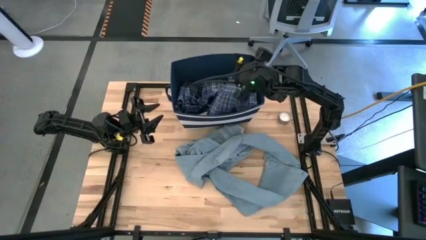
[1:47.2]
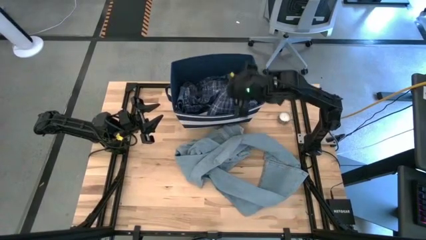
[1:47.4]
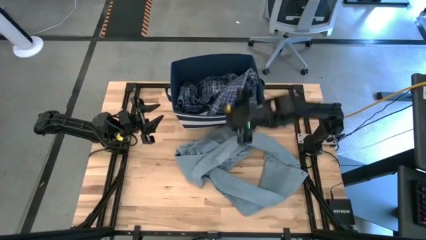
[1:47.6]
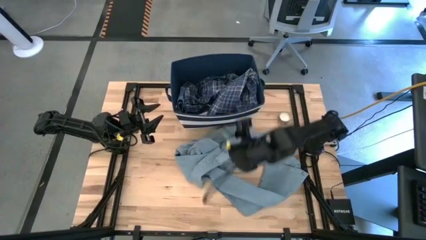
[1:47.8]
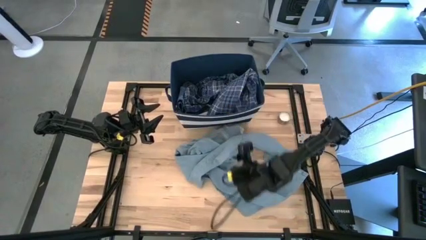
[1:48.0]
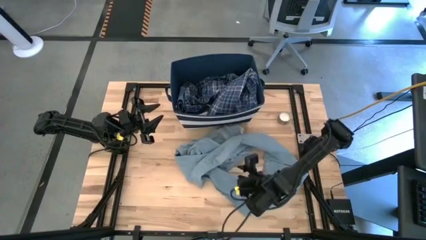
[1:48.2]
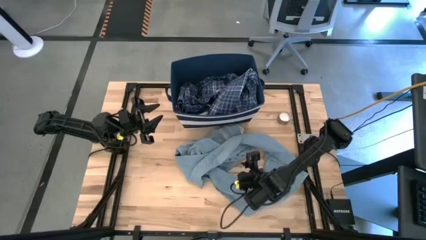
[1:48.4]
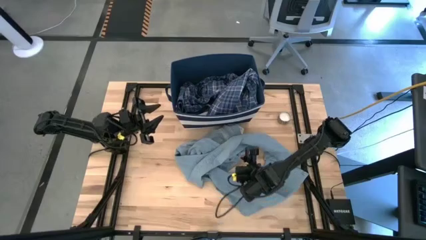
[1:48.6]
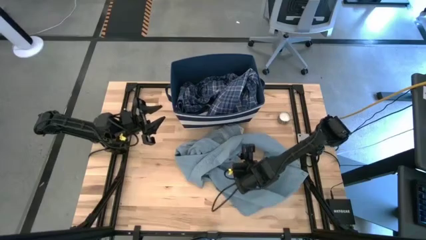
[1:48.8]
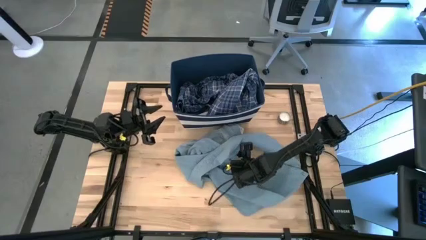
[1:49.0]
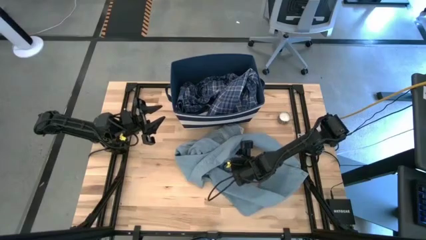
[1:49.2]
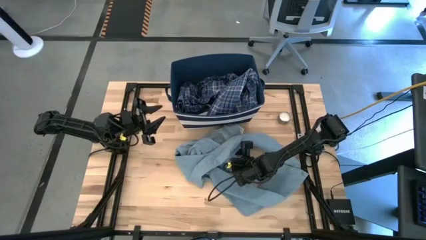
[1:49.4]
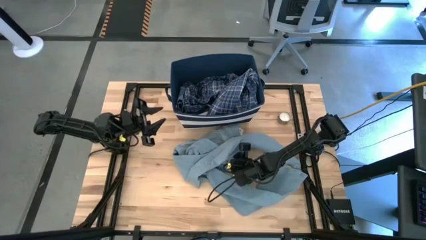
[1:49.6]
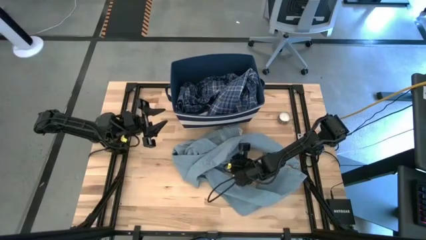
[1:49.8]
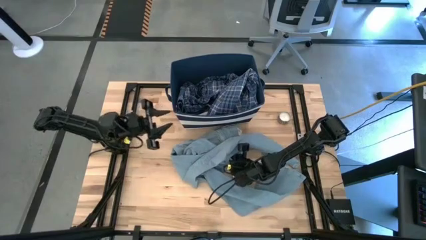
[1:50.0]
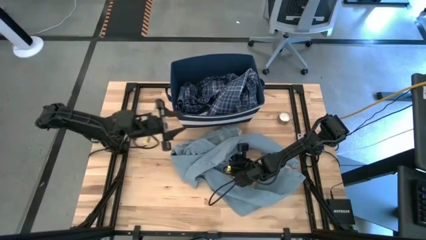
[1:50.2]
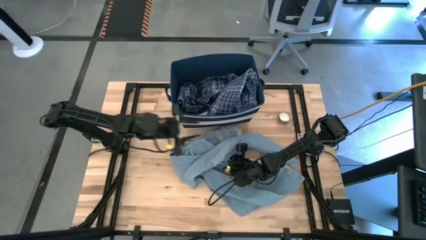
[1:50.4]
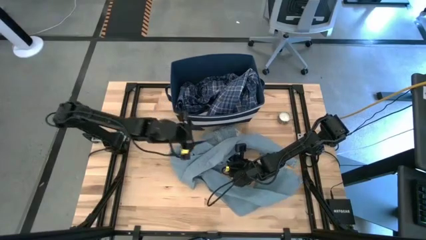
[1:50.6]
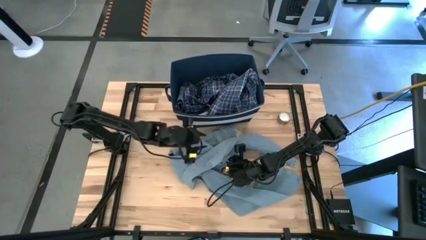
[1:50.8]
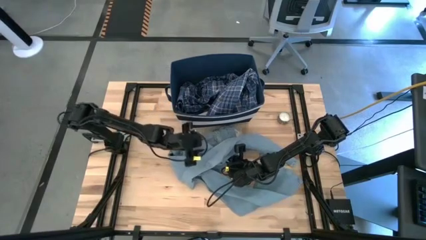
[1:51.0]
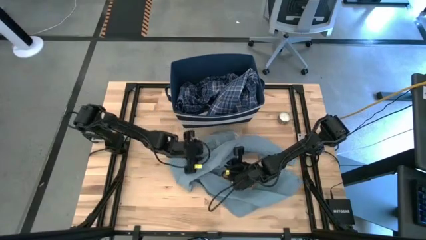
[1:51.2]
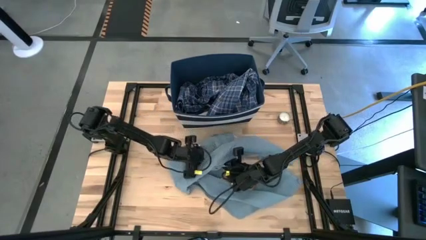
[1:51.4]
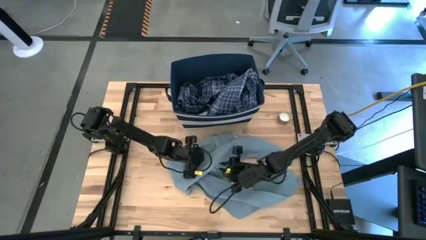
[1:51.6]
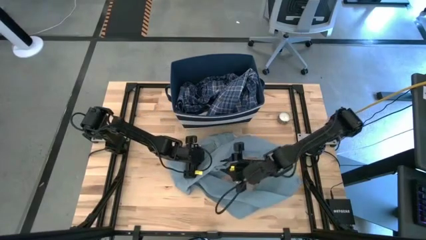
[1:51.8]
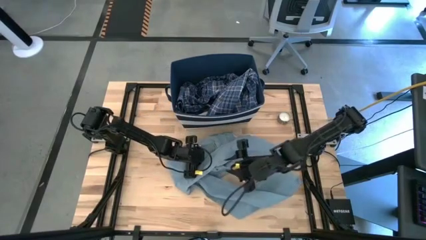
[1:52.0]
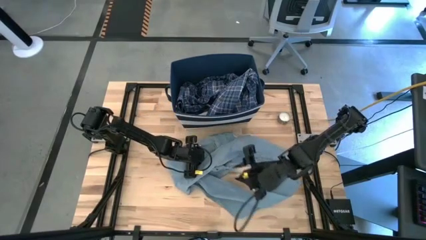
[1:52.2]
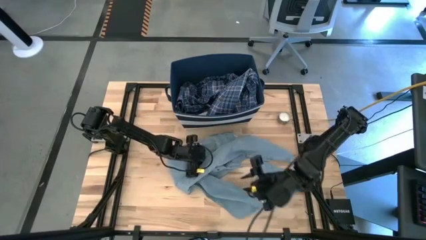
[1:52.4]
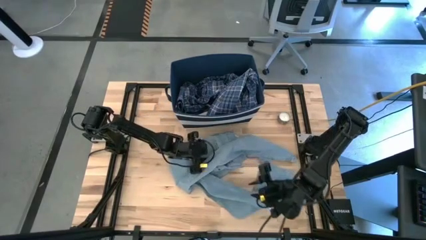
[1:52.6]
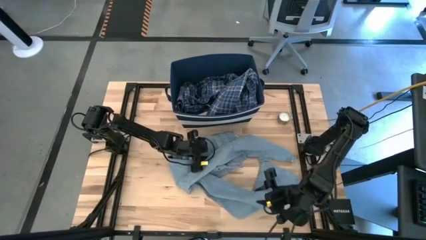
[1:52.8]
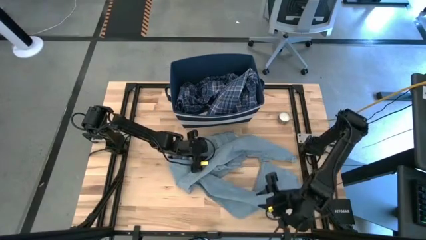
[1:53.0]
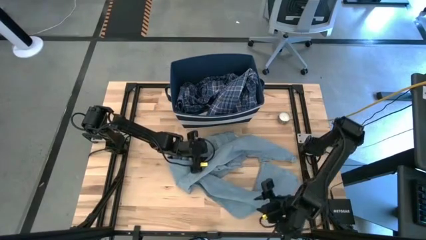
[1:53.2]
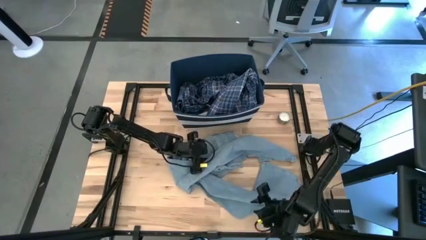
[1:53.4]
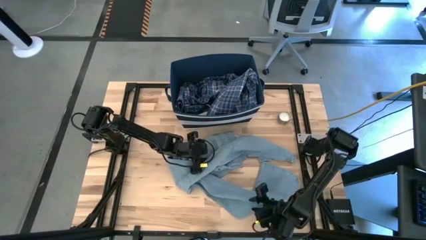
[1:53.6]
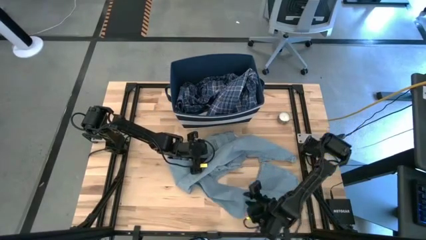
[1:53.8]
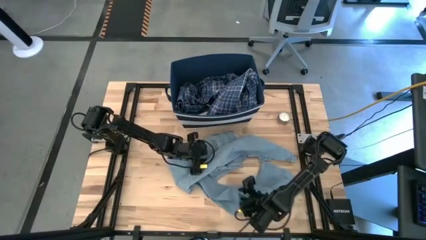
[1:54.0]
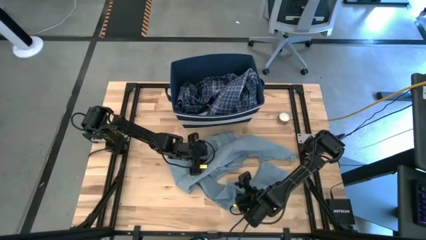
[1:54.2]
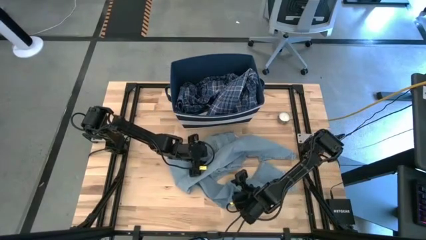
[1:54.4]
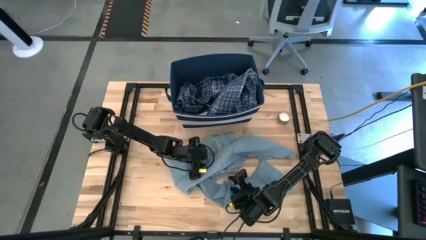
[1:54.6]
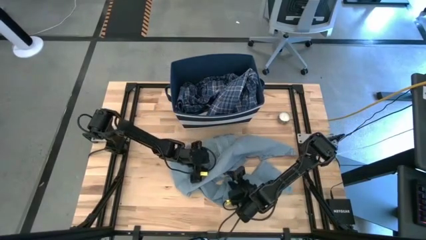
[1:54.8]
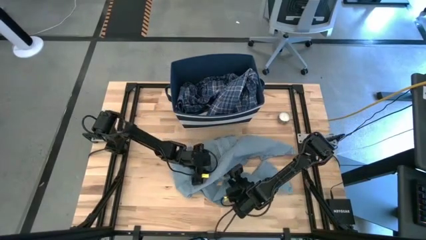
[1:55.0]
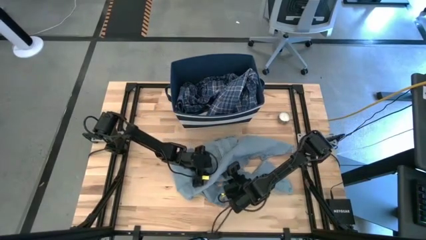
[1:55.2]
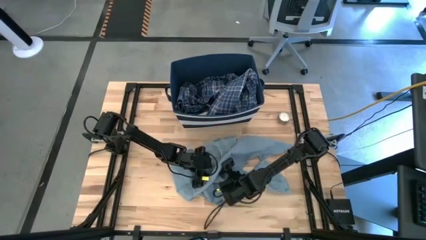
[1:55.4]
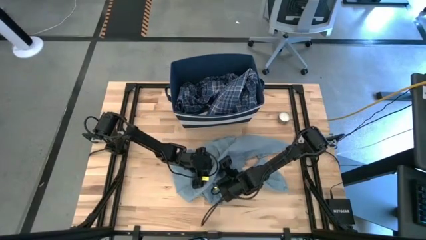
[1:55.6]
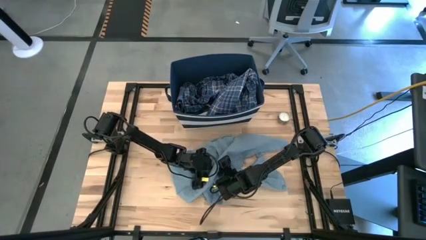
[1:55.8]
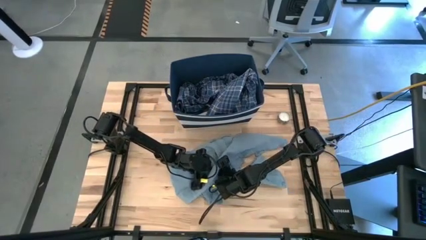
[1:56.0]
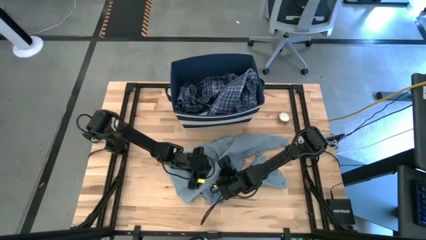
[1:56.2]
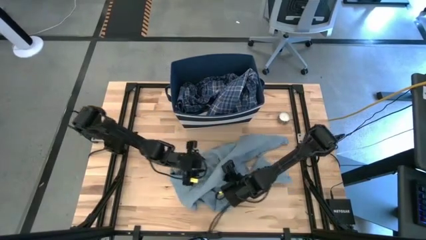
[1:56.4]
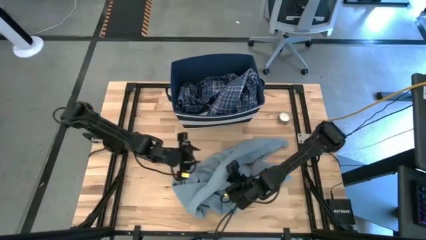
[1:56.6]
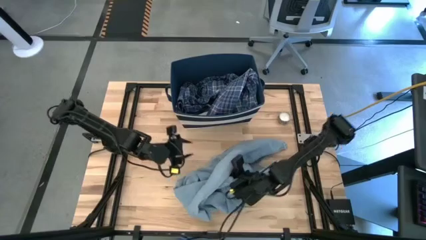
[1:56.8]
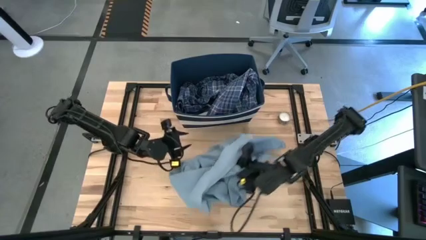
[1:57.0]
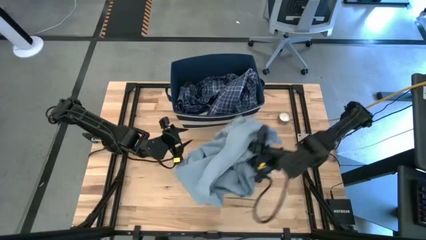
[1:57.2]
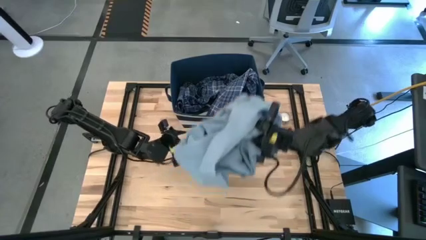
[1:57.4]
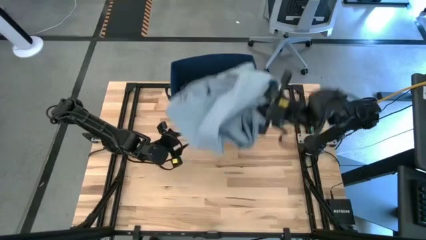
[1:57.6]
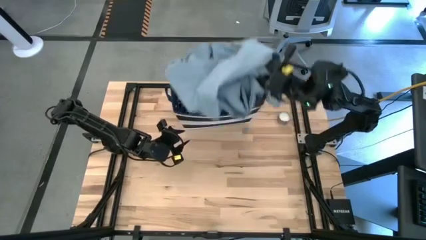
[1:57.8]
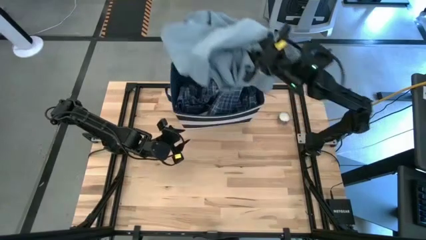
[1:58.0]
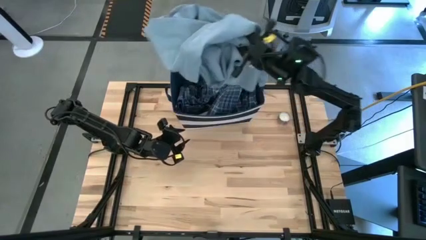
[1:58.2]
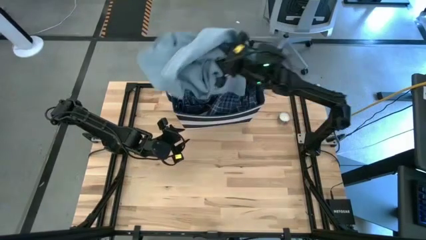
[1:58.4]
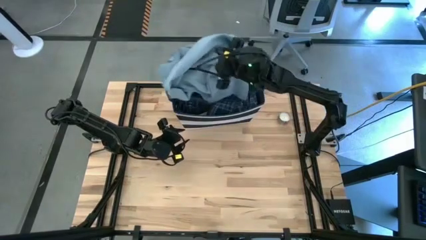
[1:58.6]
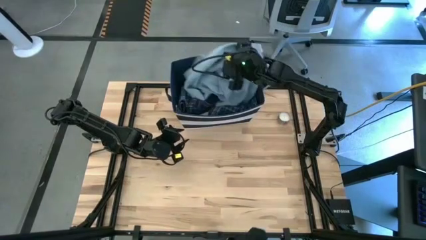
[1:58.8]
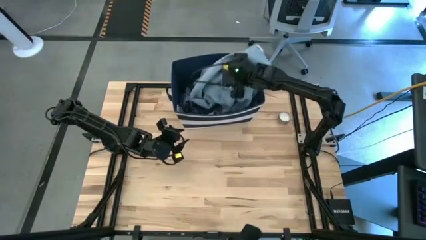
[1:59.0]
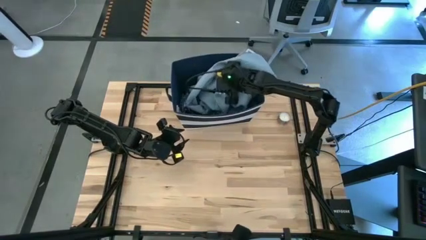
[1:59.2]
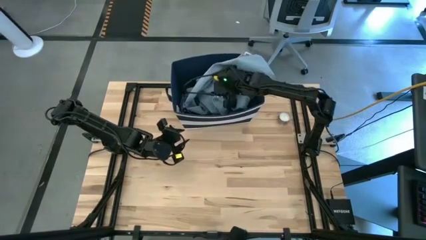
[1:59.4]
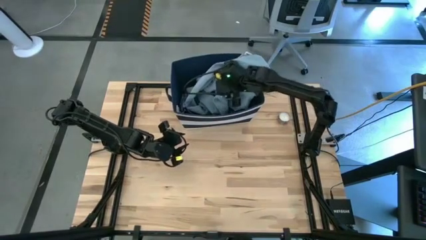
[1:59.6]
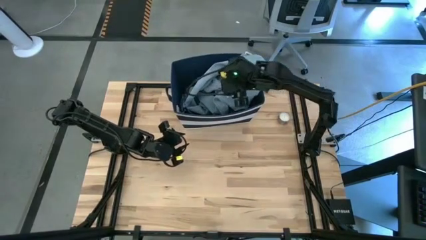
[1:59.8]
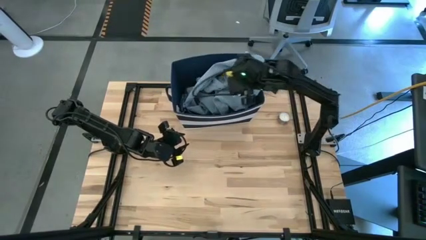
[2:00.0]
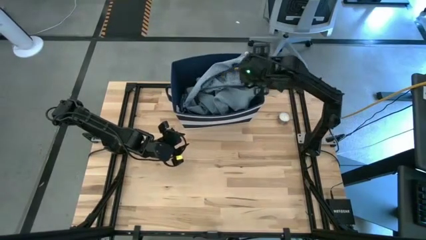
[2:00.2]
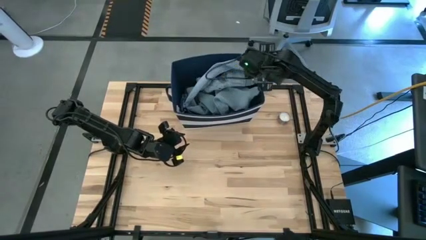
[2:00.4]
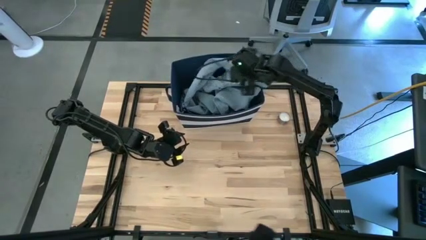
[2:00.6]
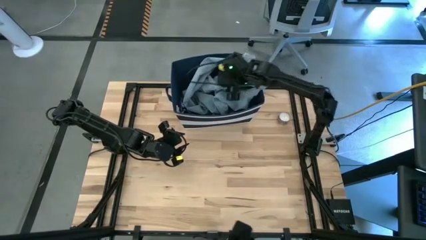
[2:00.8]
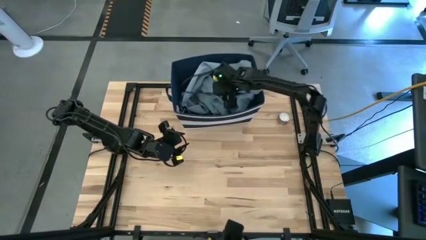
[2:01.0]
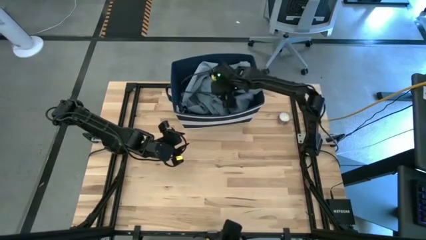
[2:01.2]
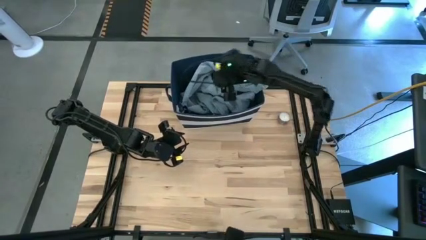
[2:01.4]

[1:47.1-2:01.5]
Task: Sort clothes
Put the blue pants into the blue laundry bin

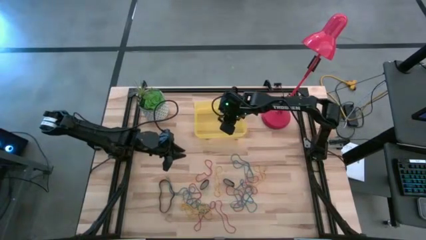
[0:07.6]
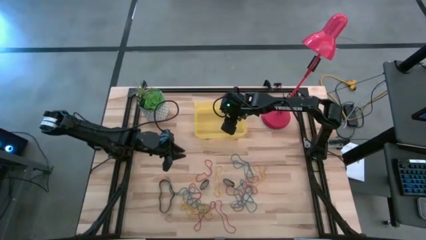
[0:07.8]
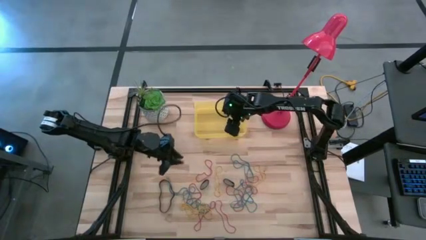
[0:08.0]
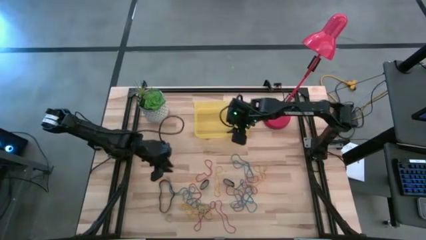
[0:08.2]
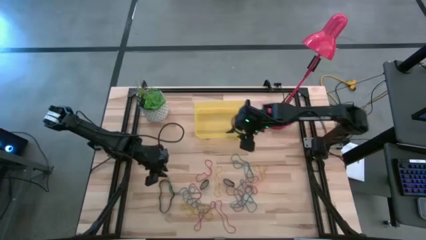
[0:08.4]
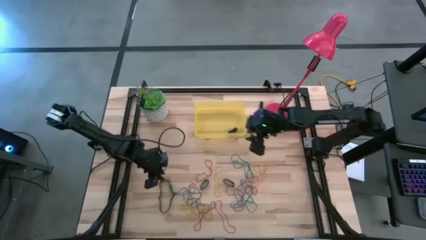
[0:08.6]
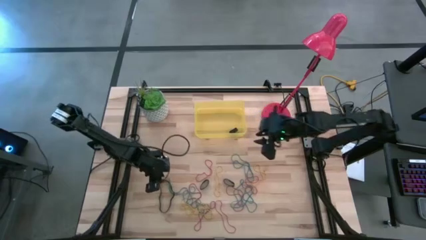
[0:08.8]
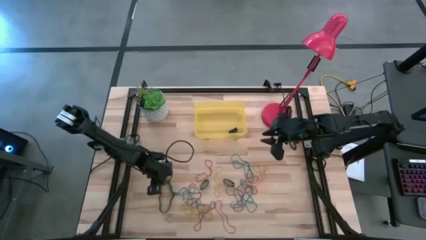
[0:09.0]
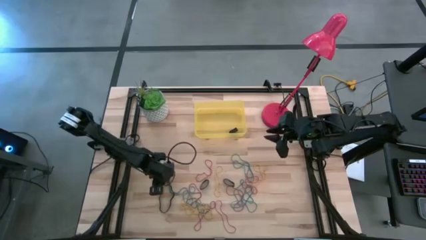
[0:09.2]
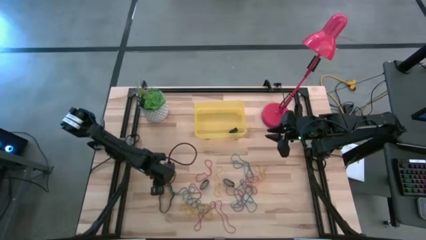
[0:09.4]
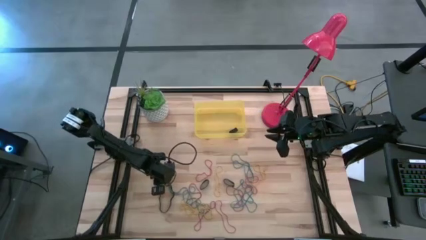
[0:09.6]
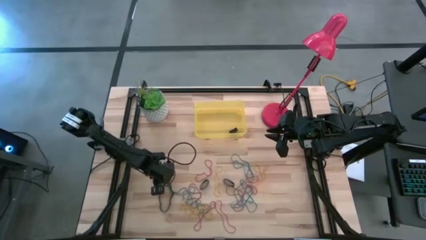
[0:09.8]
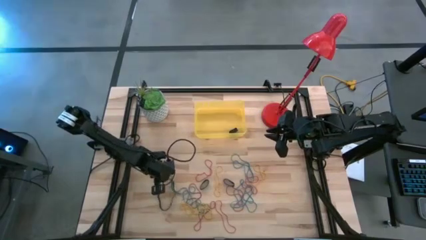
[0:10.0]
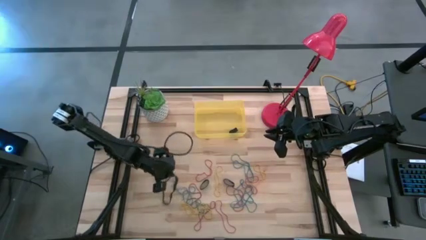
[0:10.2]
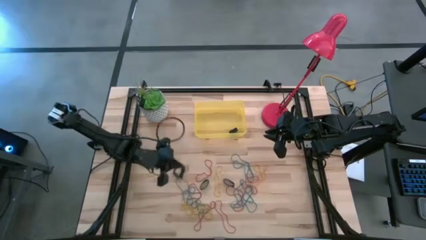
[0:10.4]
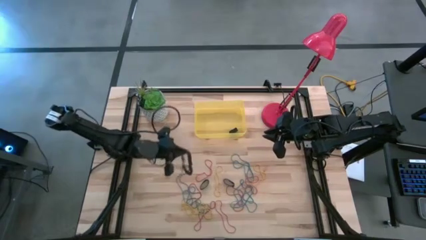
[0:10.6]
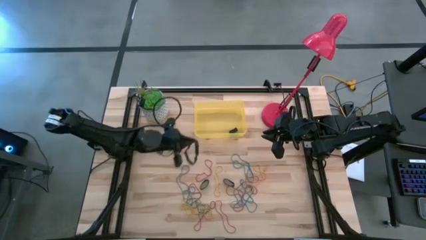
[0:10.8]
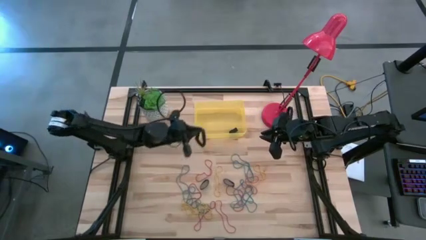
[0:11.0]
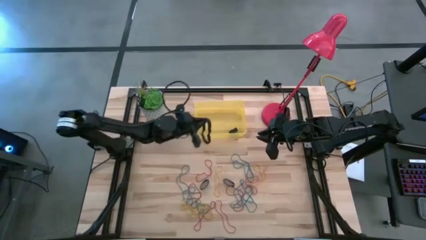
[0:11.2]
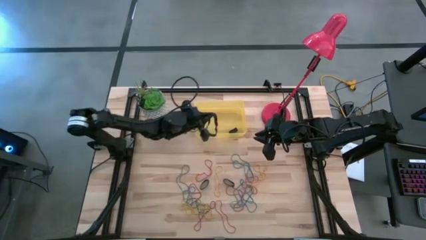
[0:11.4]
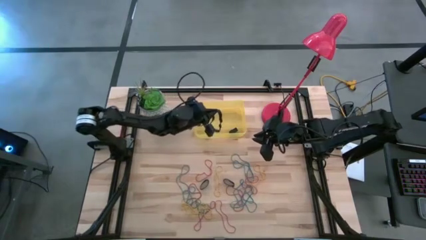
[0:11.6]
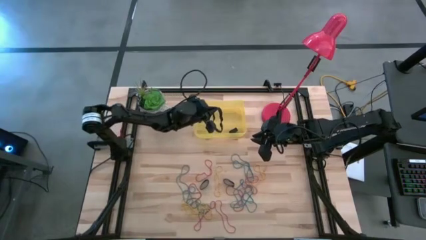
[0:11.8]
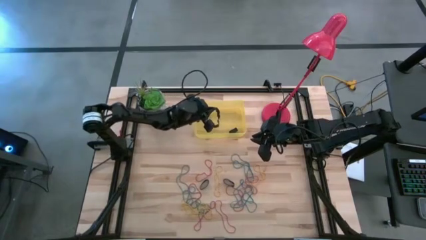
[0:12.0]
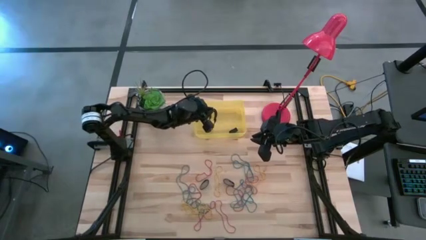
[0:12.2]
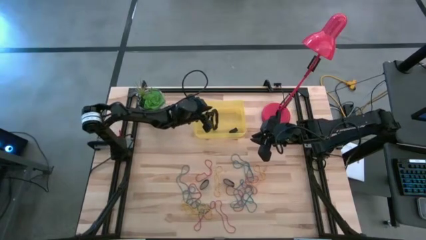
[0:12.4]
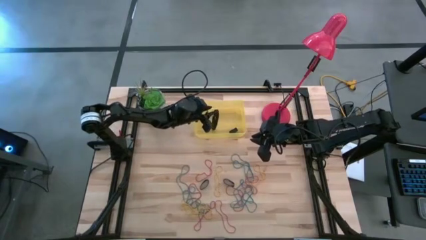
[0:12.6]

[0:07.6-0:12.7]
Task: Pick and place rubber bands into bin
Put the black rubber band into the yellow bin
